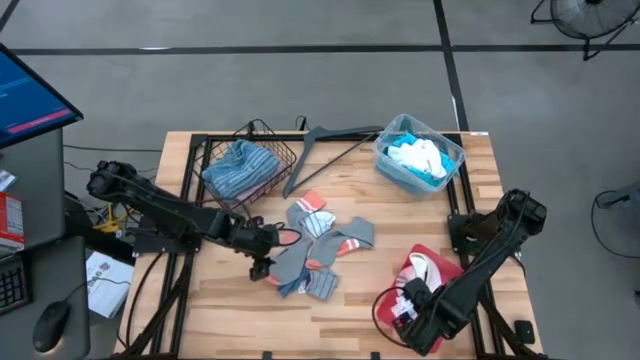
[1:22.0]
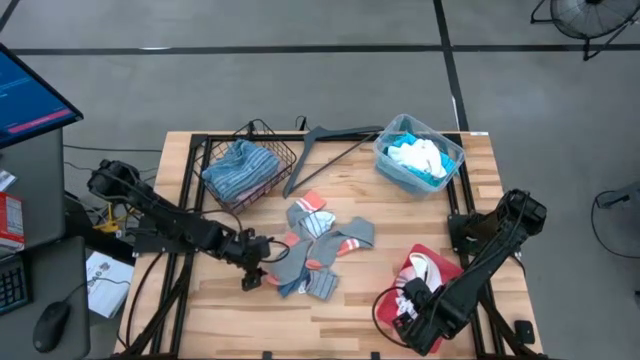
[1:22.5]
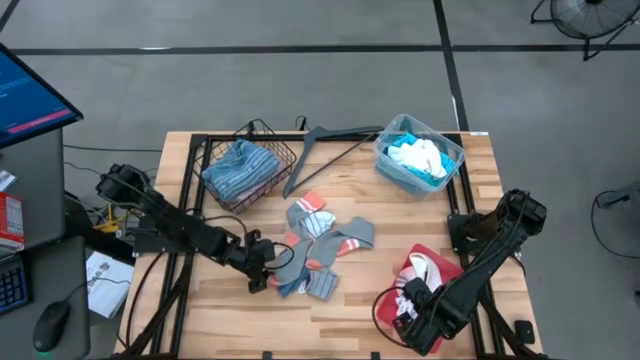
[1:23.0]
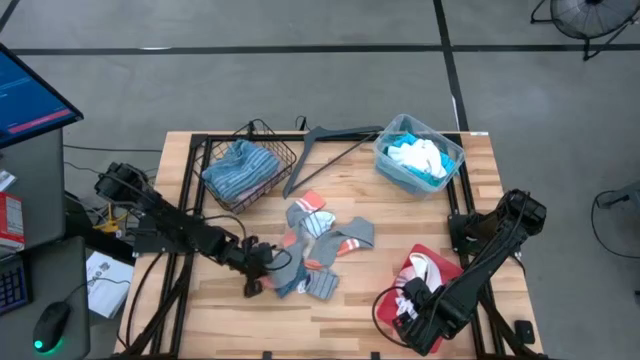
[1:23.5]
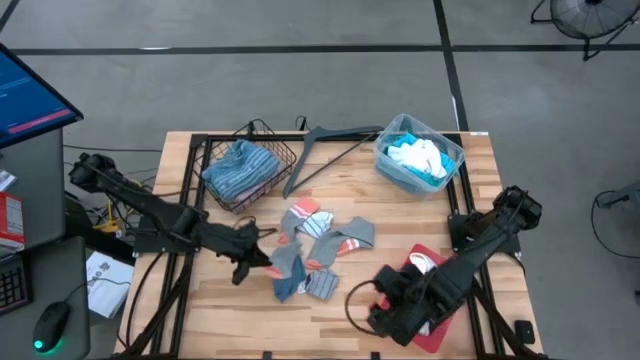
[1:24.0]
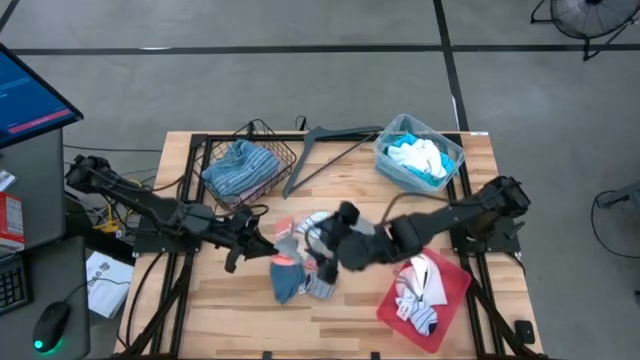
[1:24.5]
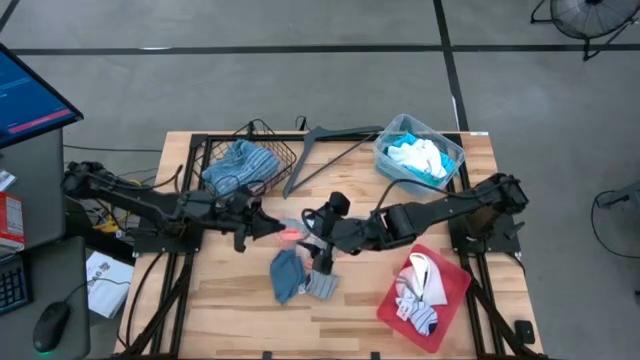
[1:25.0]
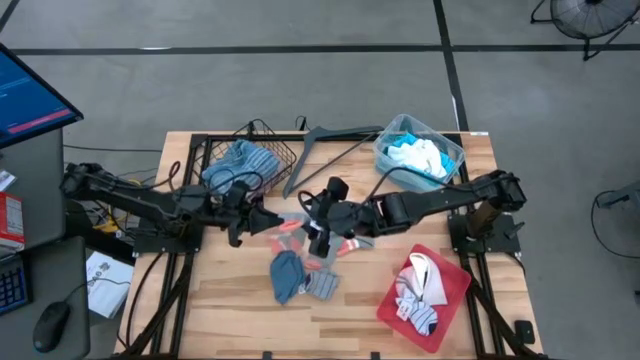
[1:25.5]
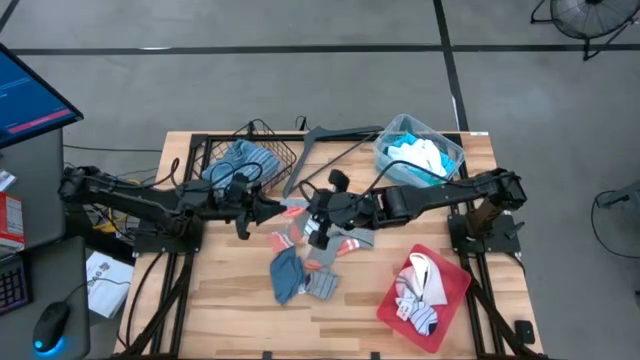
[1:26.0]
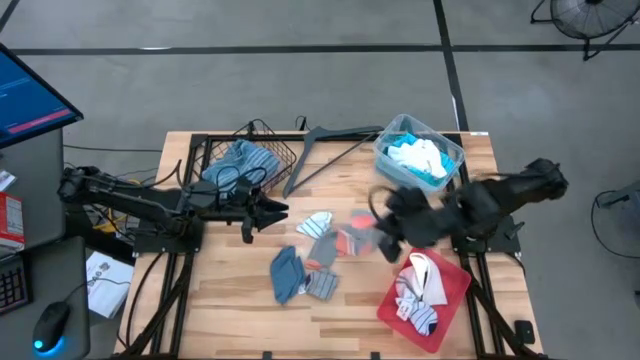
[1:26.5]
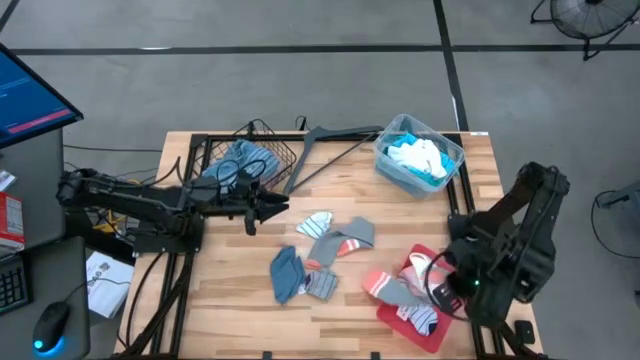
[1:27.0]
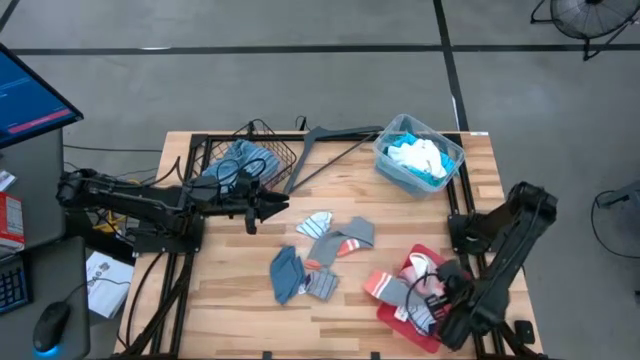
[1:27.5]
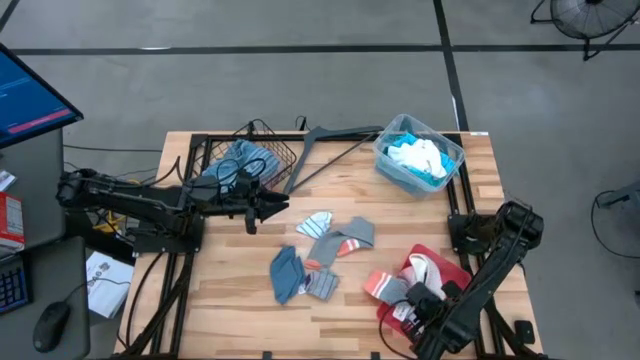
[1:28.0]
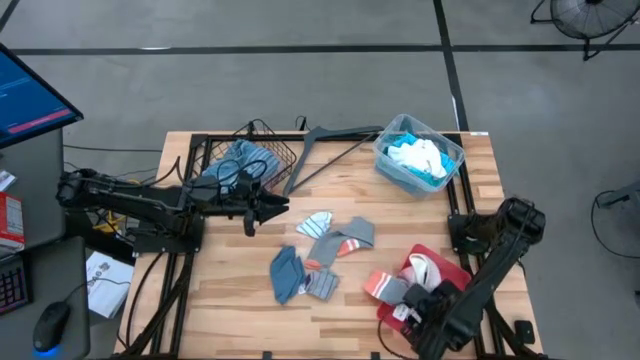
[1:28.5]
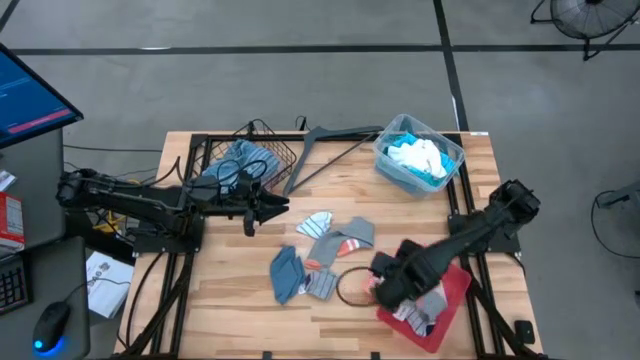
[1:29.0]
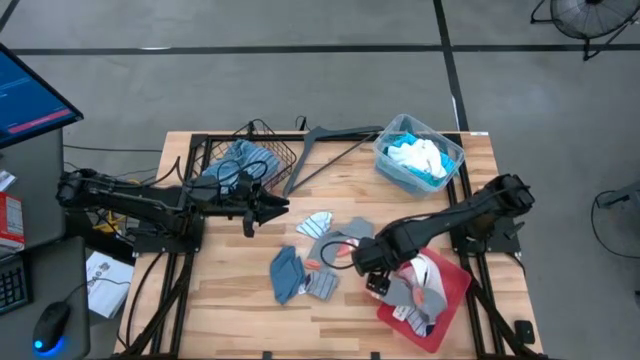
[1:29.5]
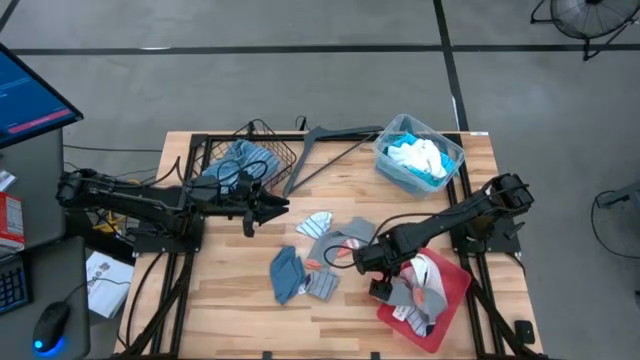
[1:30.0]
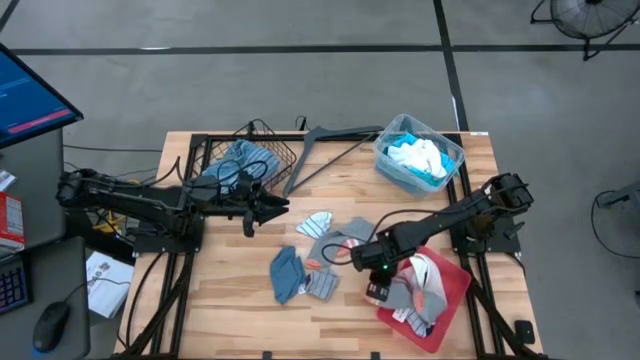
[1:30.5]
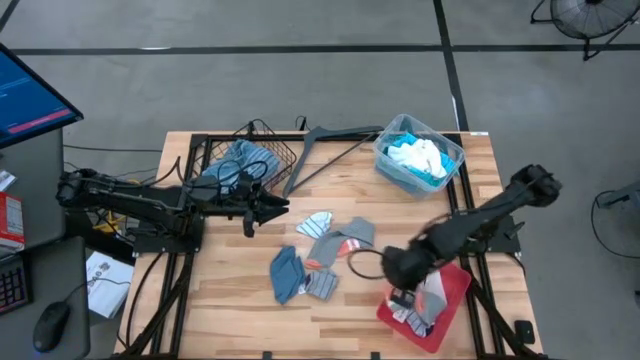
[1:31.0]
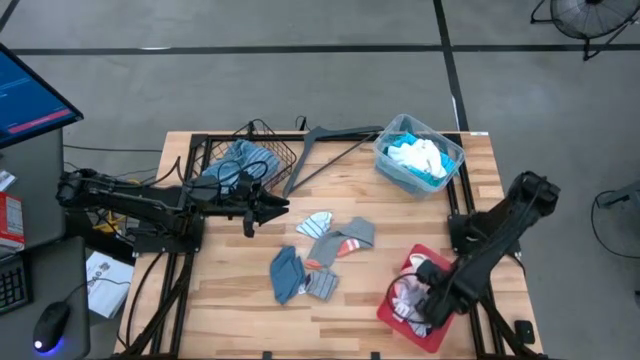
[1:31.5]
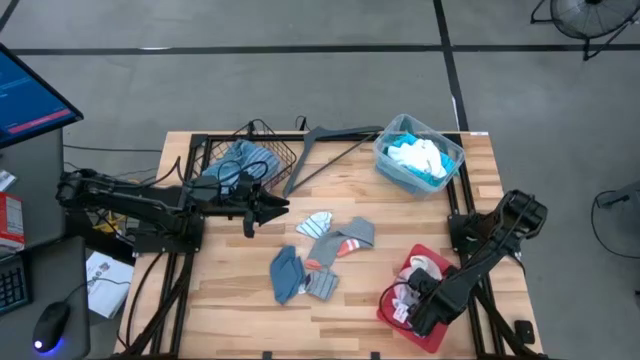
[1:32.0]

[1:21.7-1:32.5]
Task: Pick & Place Cloths
Put the left gray sock into the red bin

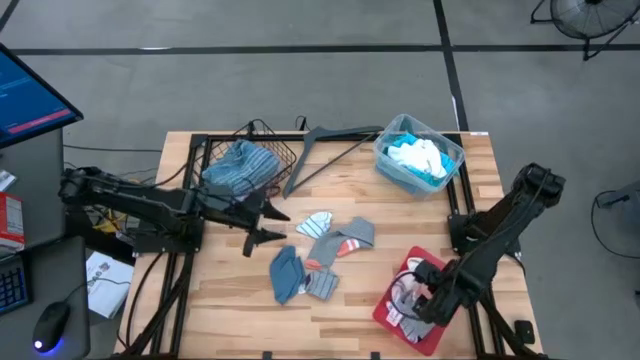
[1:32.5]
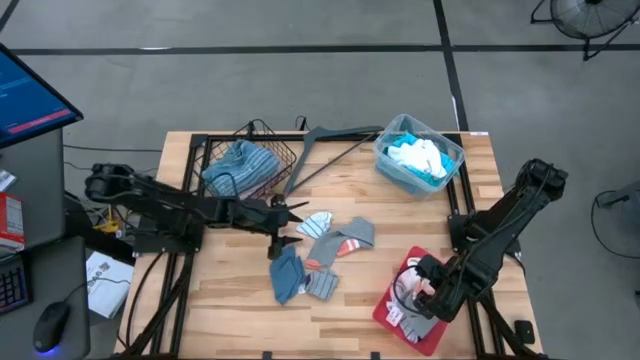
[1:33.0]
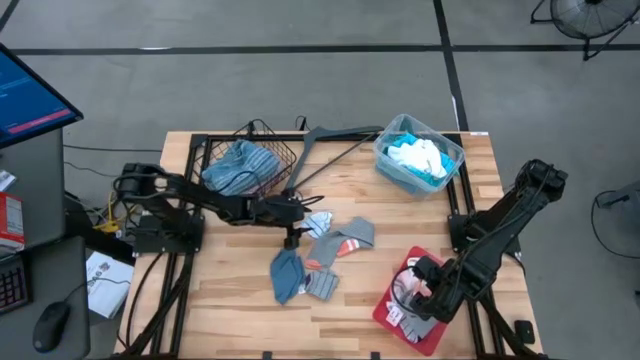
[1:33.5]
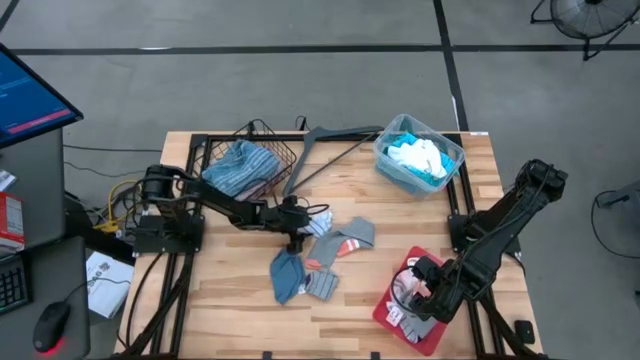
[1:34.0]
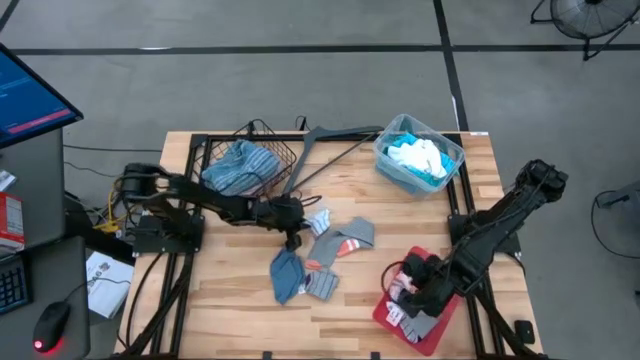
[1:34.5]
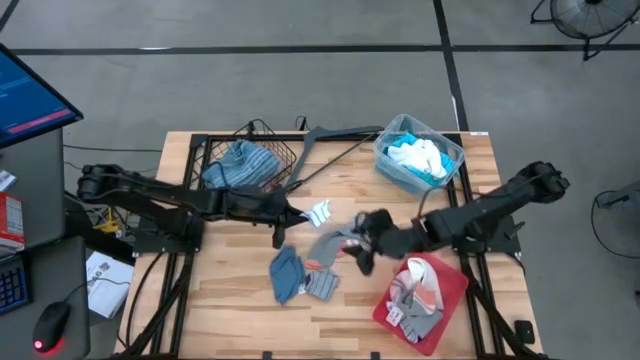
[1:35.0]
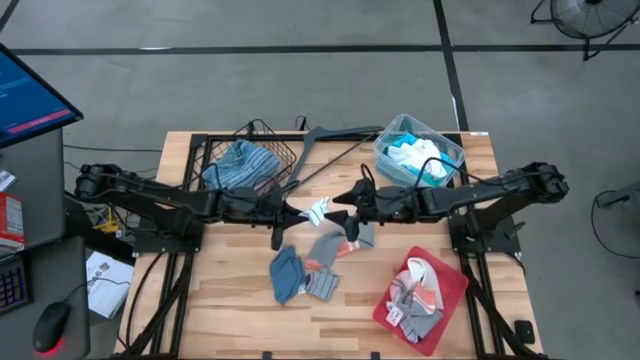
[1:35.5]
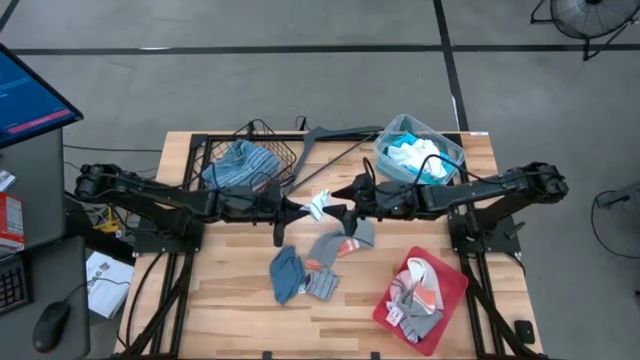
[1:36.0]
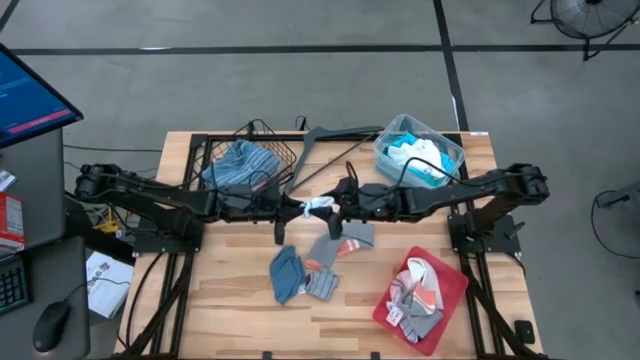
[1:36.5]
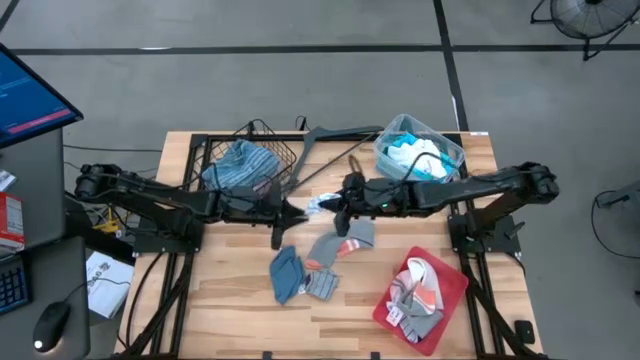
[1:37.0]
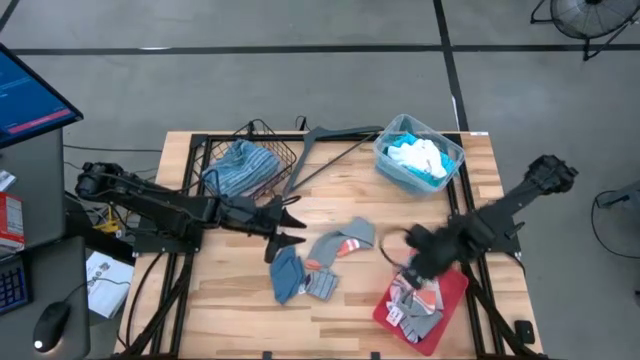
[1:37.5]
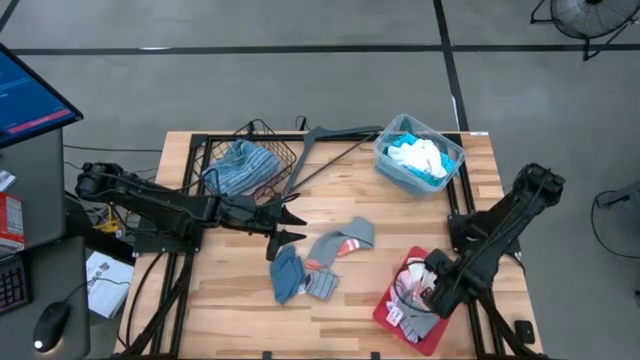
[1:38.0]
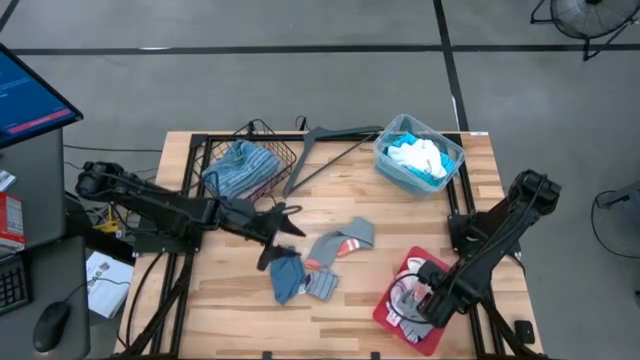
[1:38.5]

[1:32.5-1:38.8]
Put the white patterned sock into the red bin

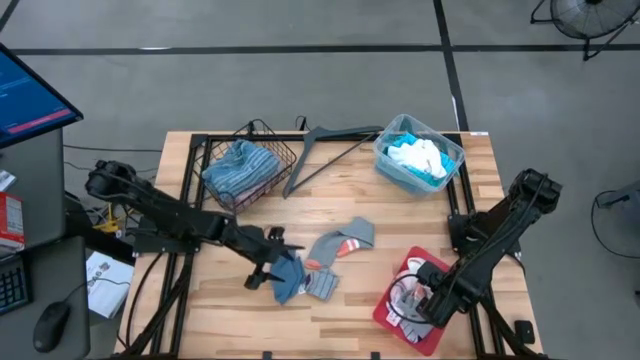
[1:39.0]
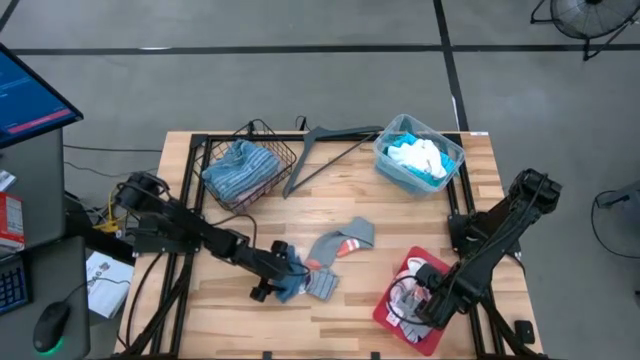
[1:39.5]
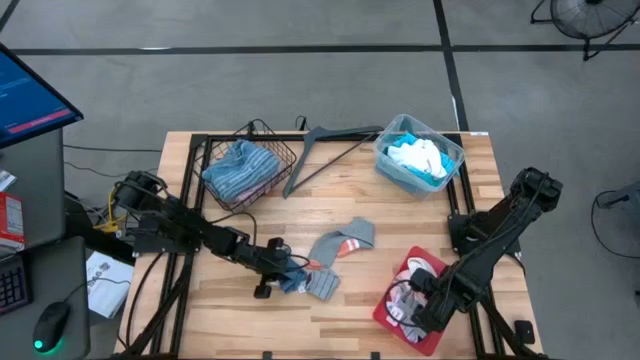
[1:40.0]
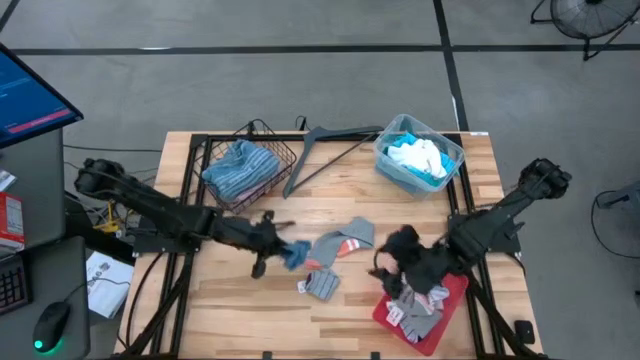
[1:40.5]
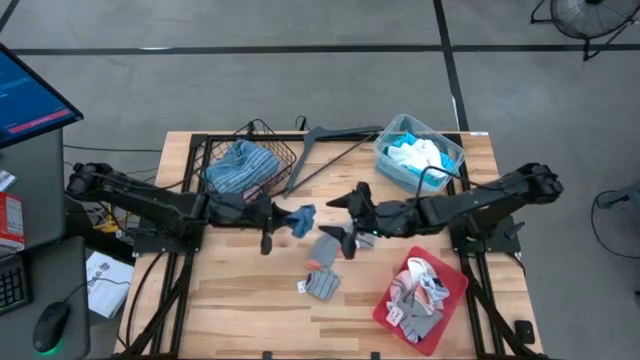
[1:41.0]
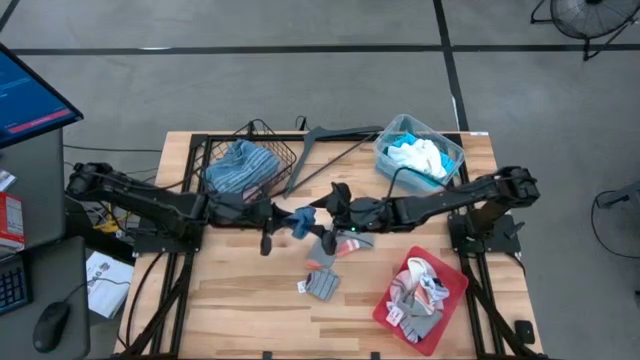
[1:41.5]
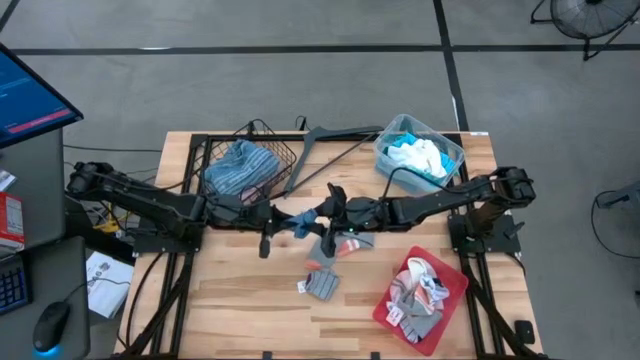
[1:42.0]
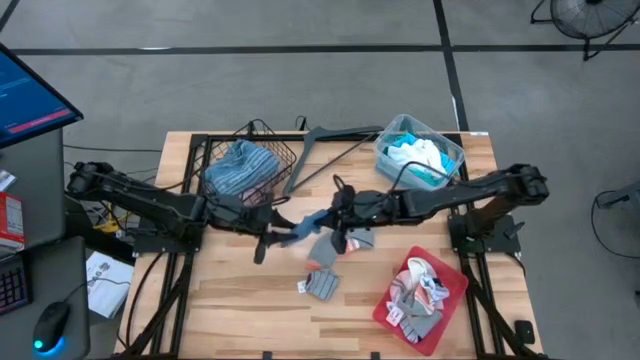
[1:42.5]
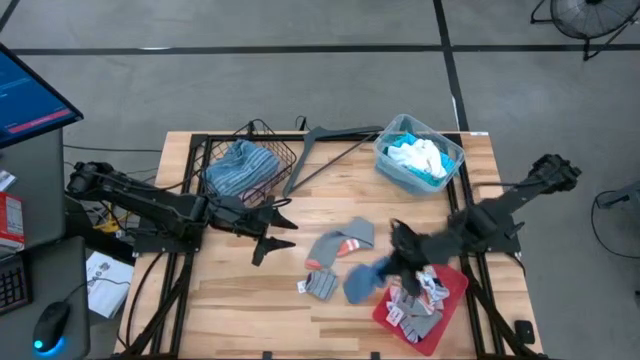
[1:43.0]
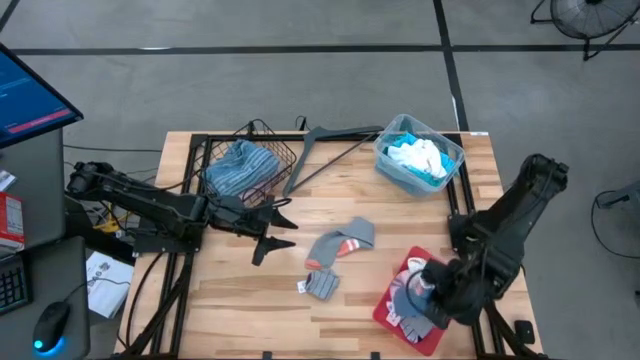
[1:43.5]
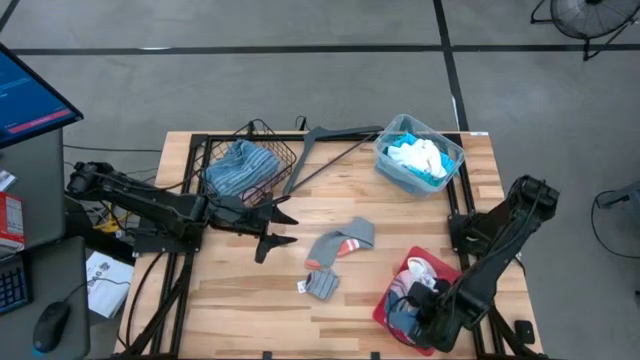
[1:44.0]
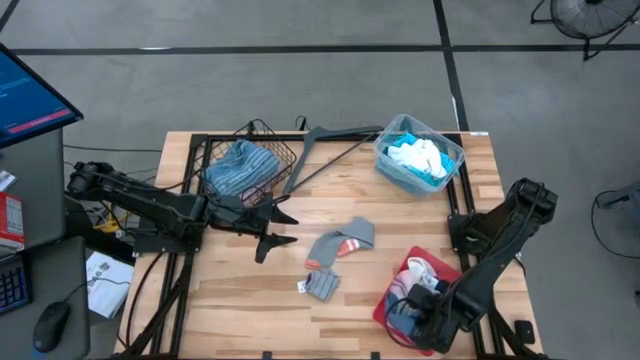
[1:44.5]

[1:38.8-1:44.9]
Put the blue sock into the red bin
